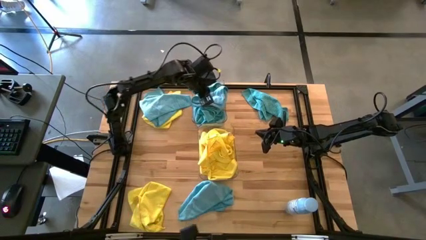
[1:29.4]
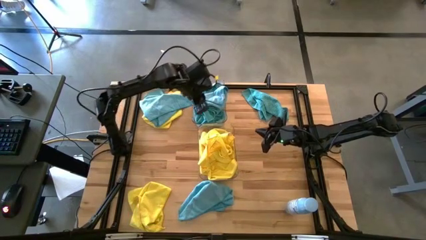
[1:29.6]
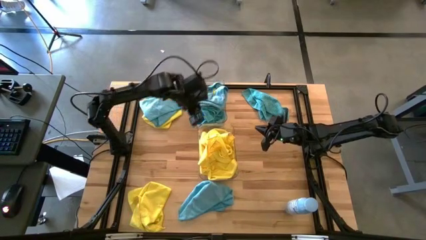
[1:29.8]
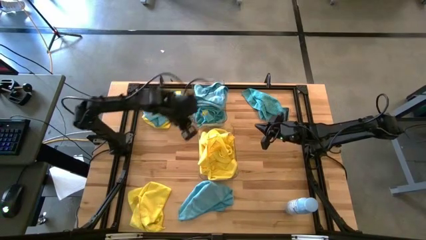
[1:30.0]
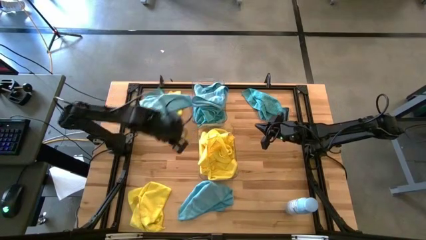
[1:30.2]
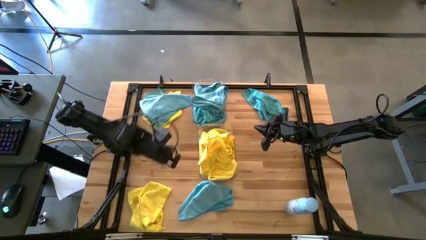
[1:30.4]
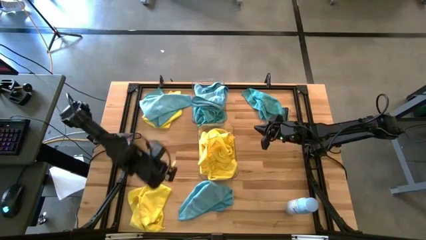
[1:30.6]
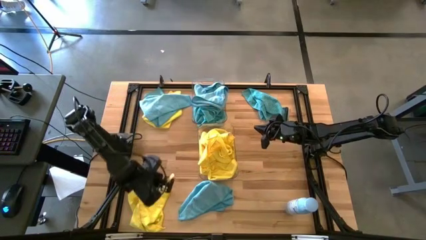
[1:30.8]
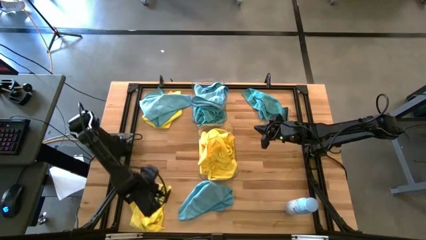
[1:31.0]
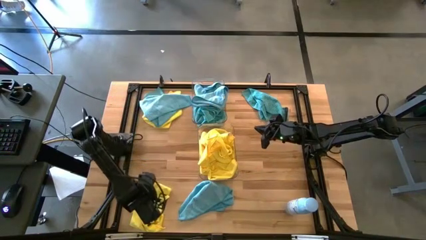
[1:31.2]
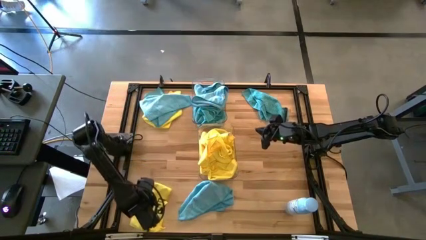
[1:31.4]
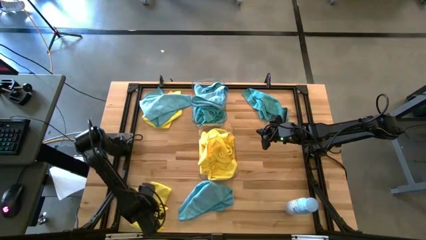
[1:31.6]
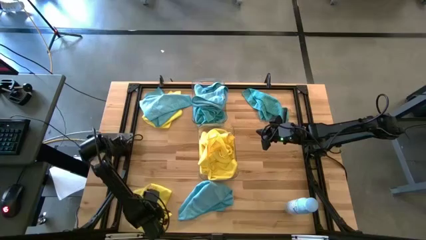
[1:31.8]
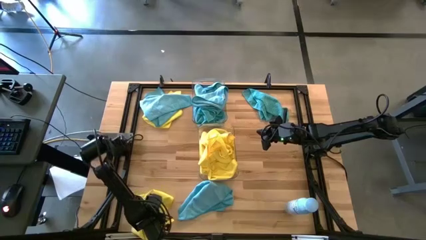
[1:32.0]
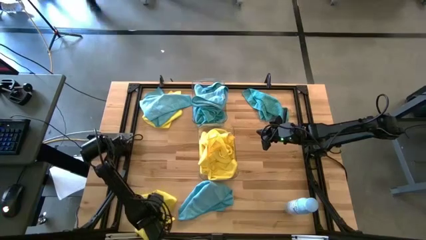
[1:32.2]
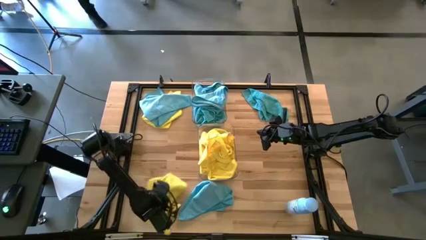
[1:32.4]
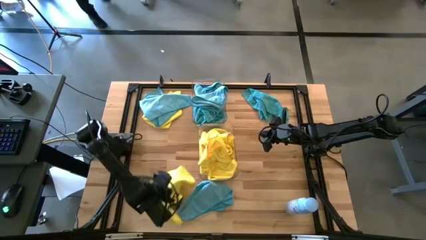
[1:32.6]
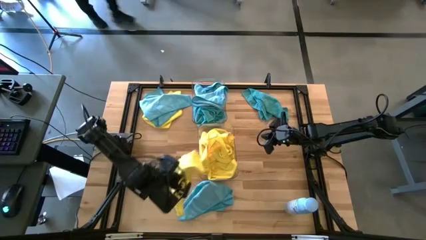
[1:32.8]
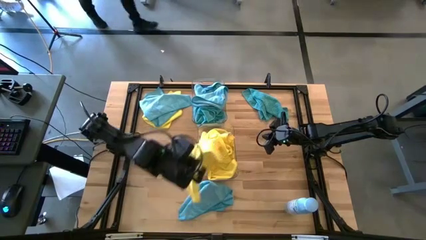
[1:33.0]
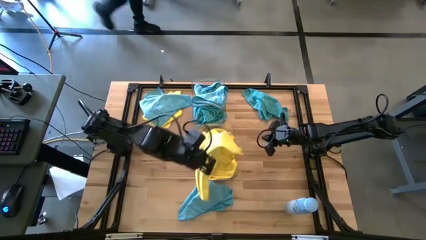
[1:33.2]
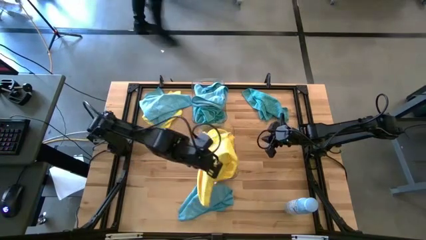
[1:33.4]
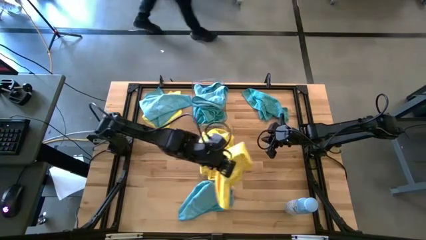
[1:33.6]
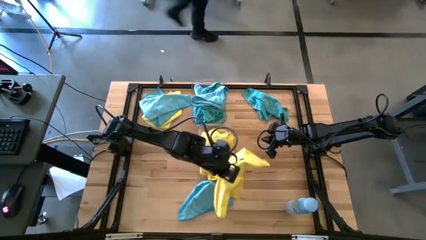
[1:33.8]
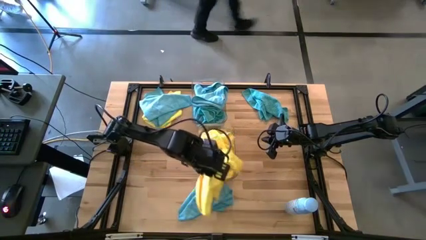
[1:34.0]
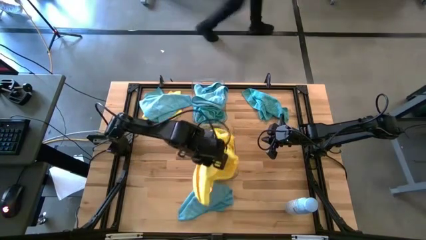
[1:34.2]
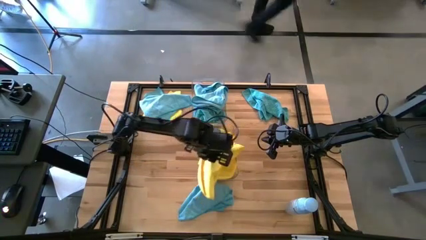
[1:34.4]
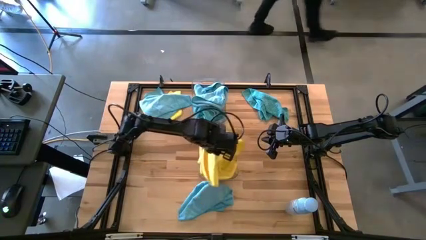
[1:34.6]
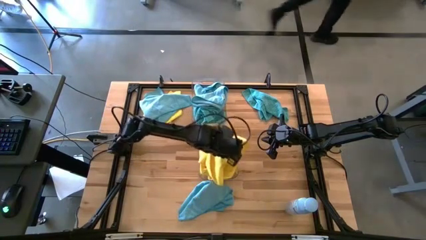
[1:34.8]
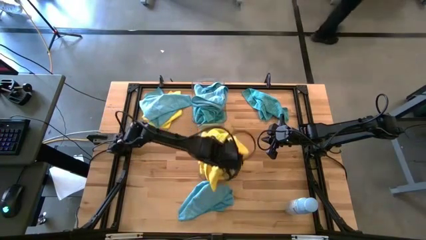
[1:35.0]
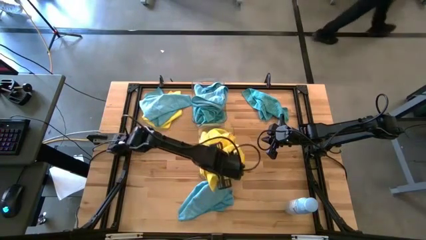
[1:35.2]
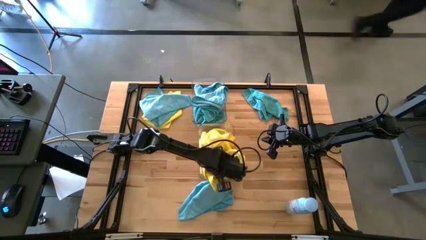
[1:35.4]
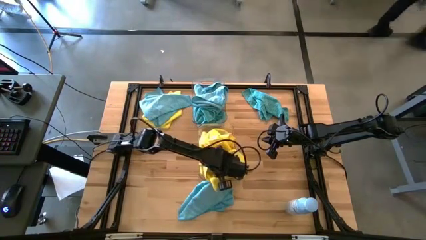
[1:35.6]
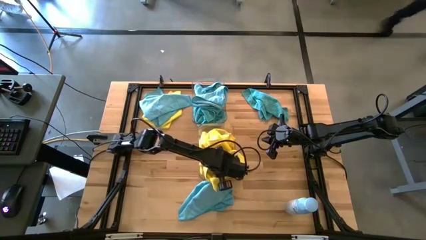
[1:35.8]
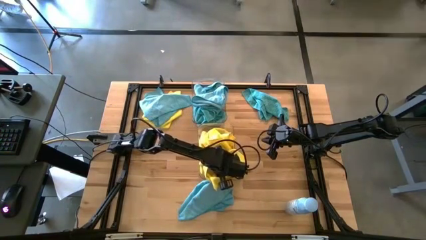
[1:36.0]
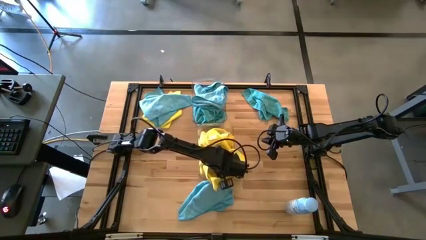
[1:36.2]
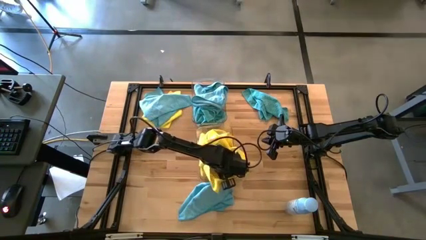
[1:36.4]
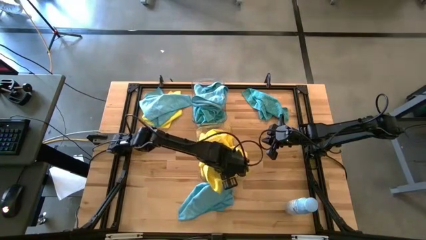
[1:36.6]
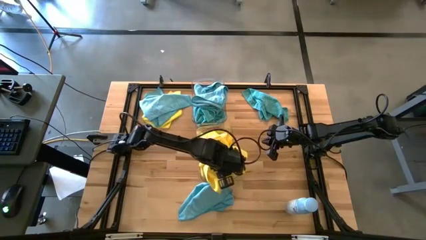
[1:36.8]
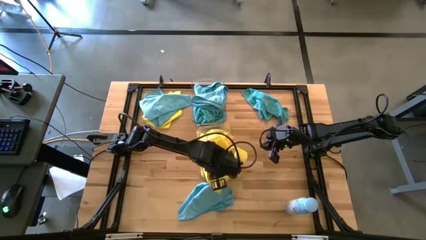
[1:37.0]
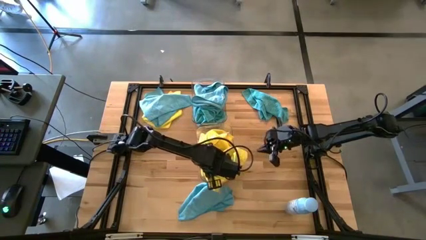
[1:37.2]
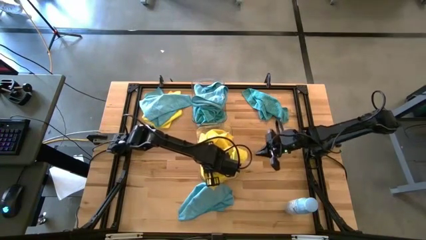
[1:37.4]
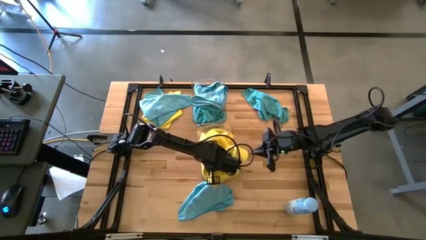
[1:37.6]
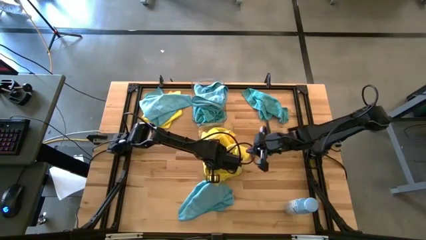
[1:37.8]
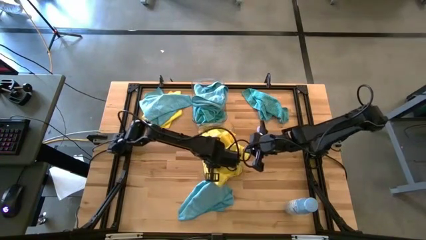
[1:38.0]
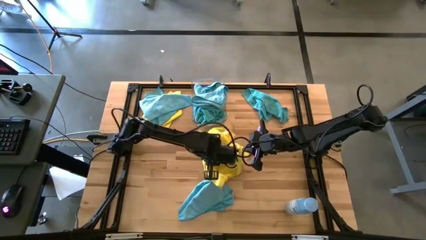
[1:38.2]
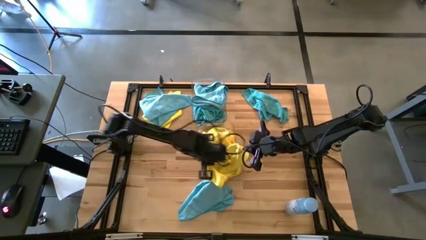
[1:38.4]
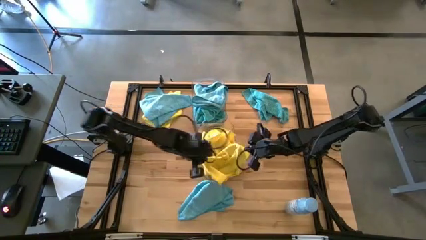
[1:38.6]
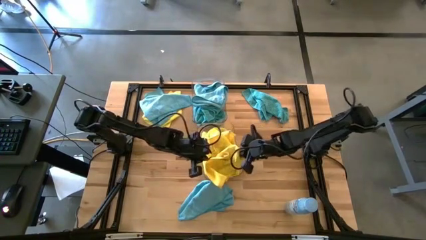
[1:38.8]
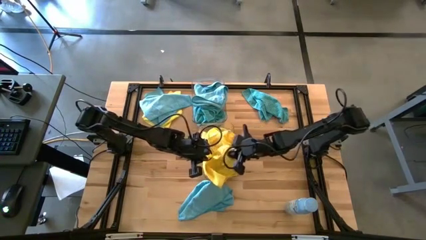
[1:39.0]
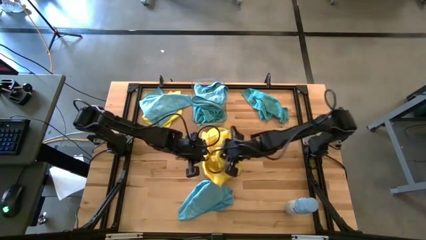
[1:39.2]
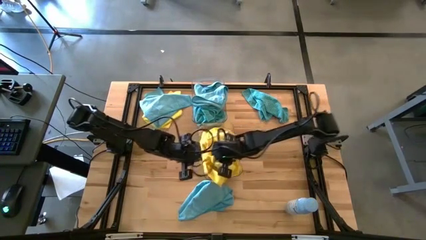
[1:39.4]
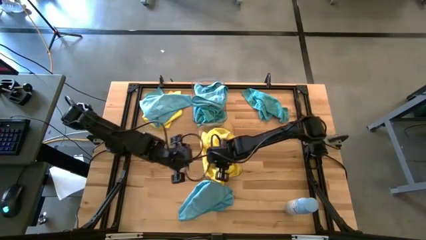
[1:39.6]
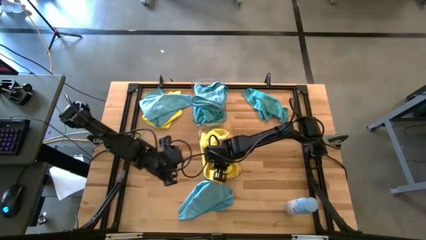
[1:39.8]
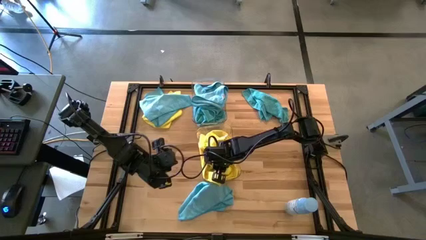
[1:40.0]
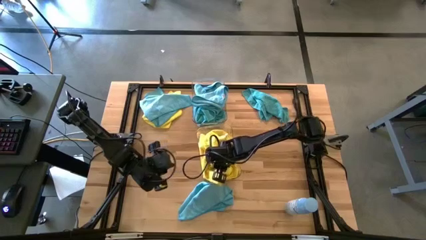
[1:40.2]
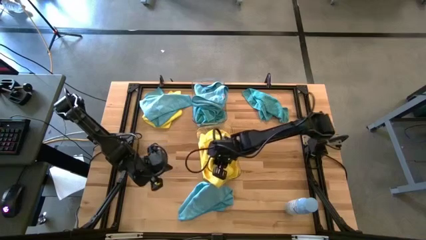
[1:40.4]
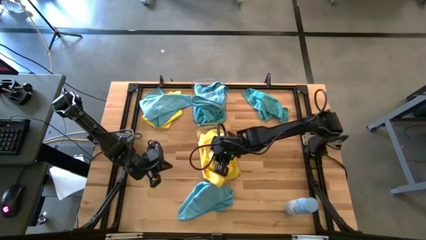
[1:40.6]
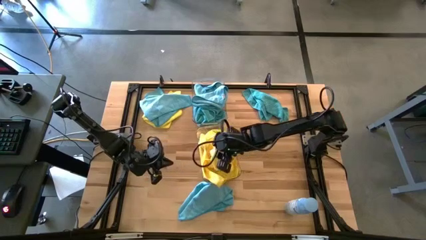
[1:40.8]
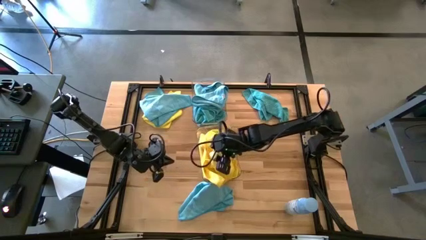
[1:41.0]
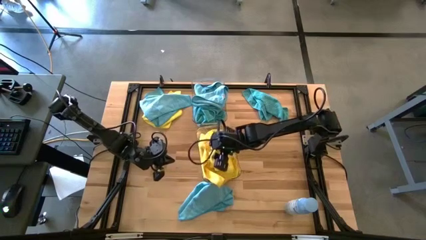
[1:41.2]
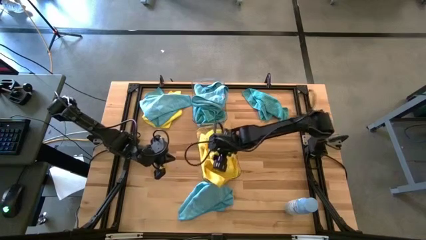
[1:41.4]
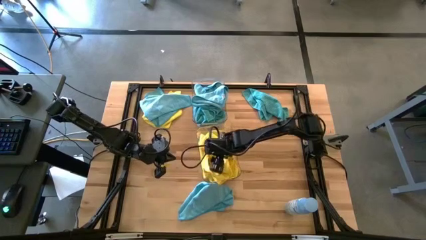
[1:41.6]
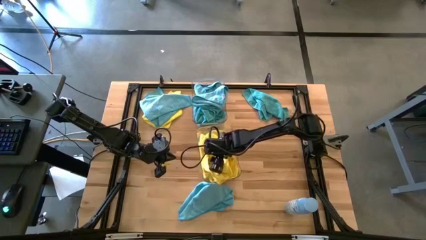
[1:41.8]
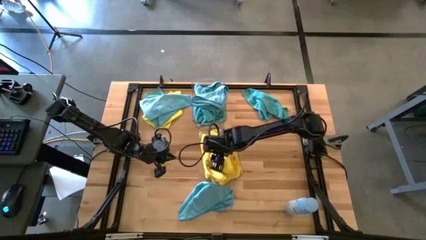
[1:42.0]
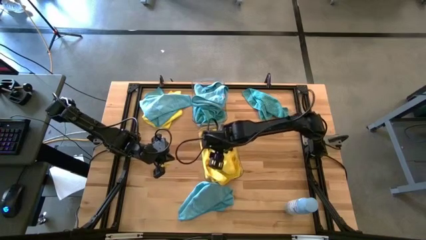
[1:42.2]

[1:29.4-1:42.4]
Task: Sort microfiber towel by color & place in baskets
Put the yellow towel into the bottom transparent bin

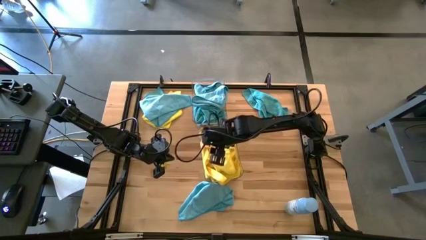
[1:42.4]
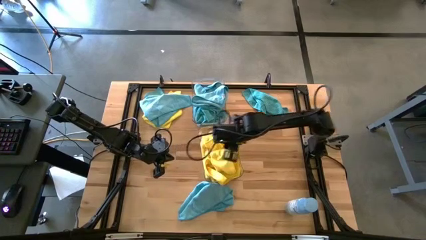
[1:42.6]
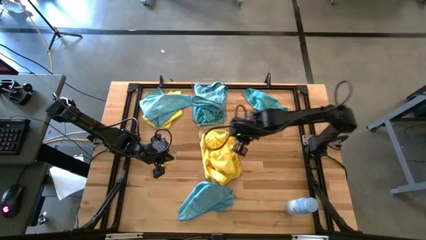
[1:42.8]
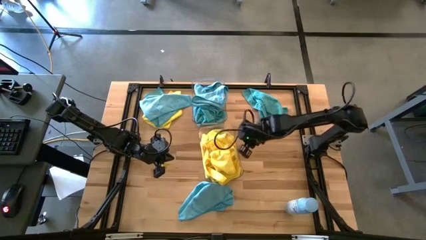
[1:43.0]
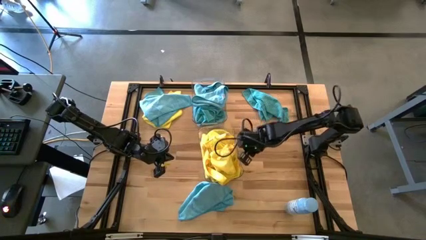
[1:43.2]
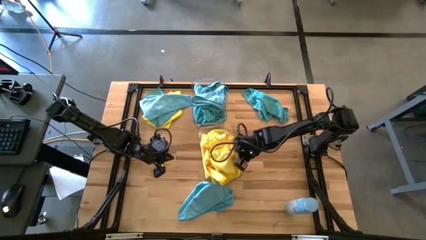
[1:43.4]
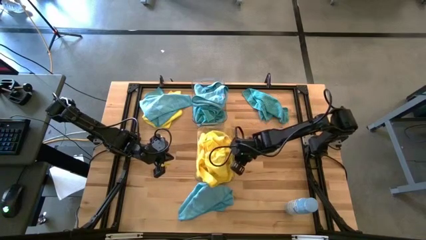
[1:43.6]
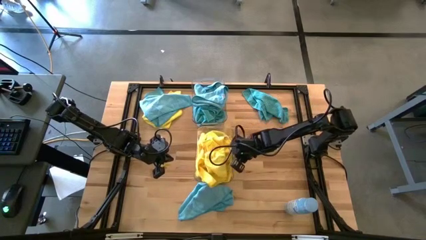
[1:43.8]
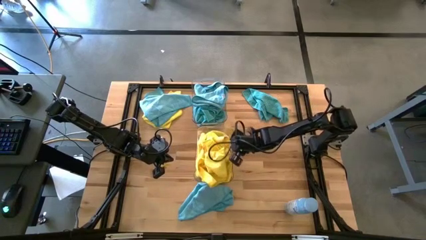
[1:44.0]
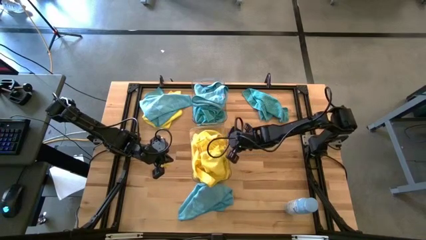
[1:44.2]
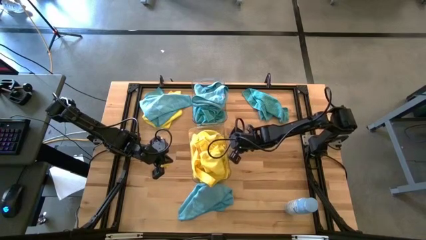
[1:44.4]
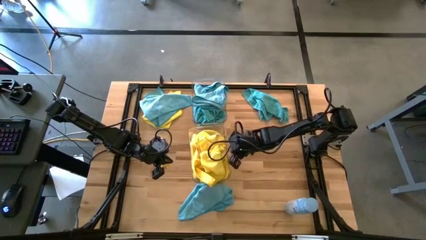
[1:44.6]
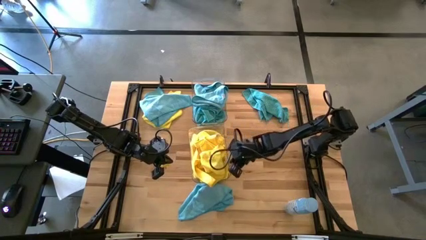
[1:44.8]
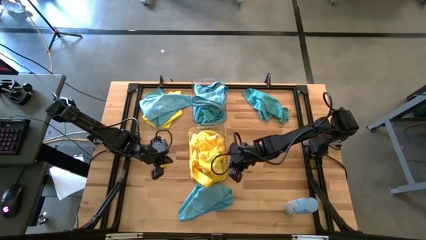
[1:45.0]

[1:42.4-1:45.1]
Adjust the bottom transparent bin
